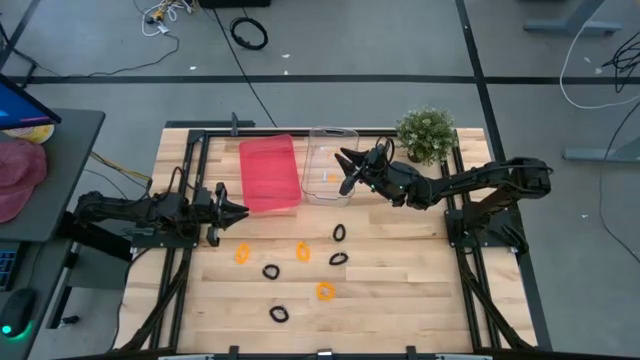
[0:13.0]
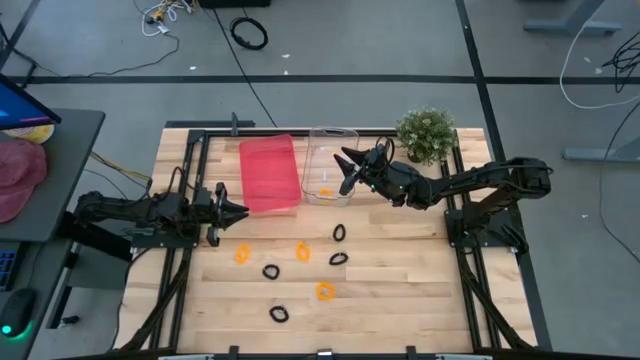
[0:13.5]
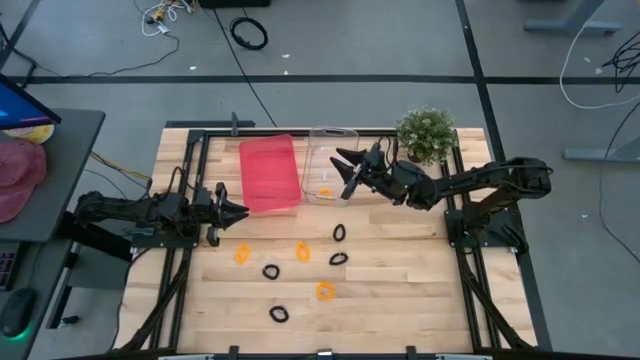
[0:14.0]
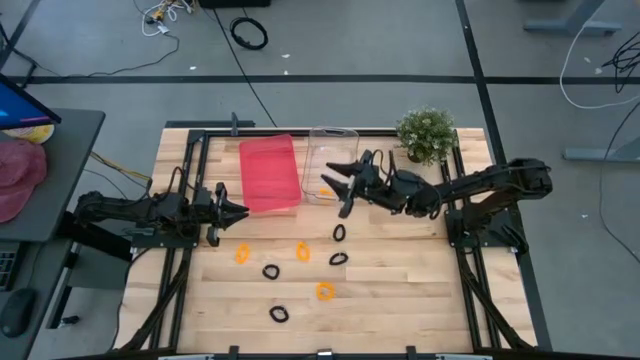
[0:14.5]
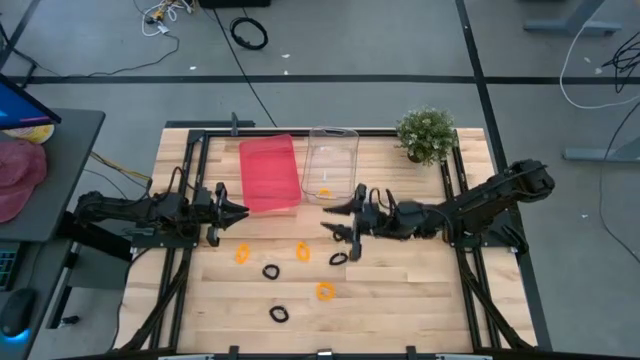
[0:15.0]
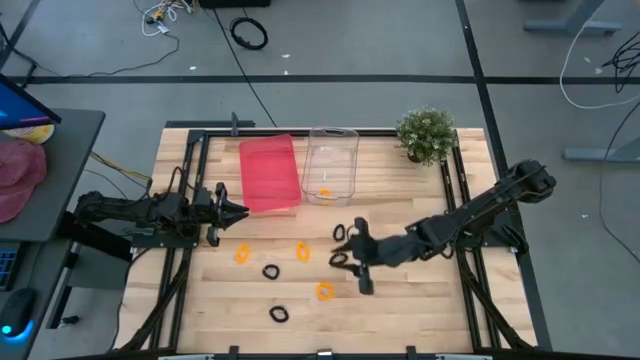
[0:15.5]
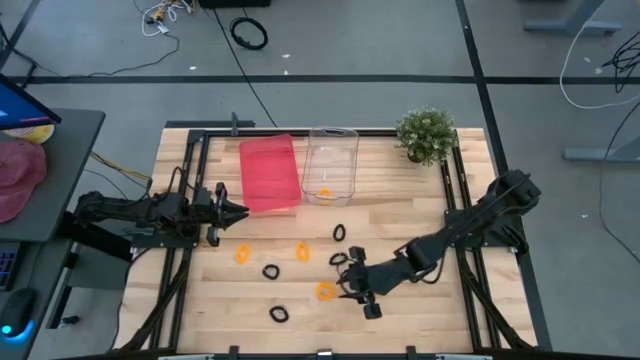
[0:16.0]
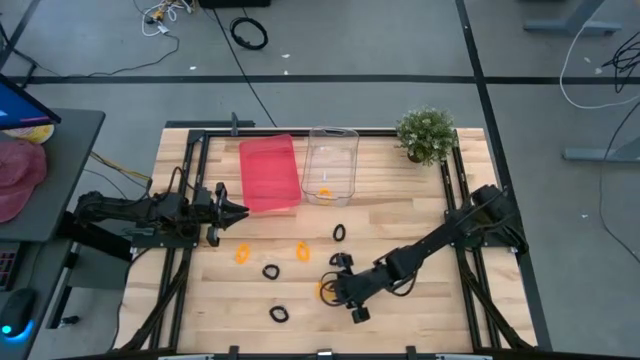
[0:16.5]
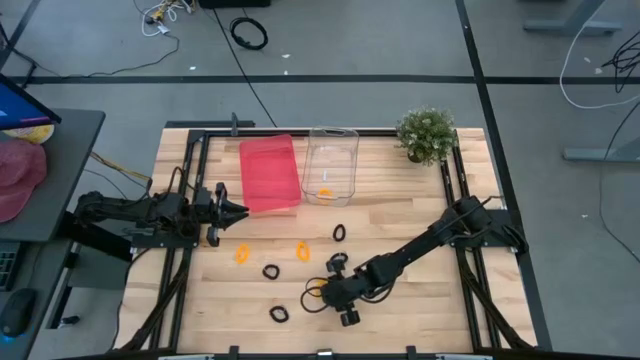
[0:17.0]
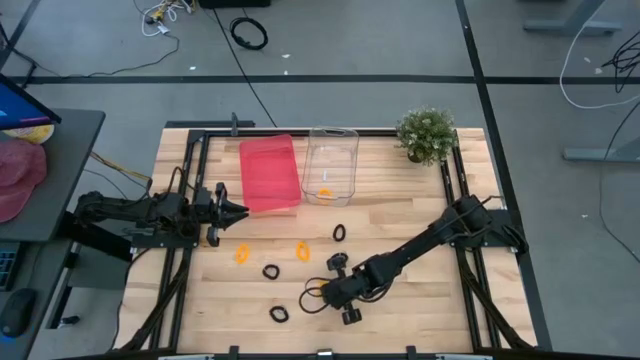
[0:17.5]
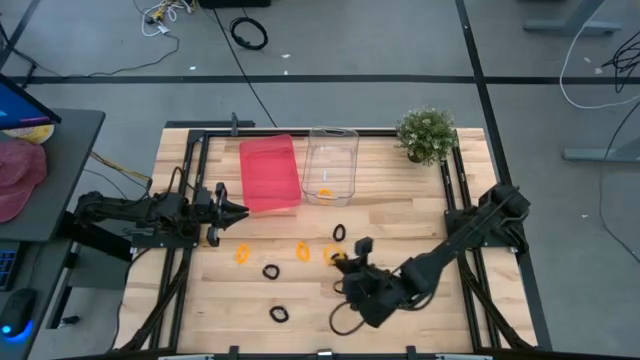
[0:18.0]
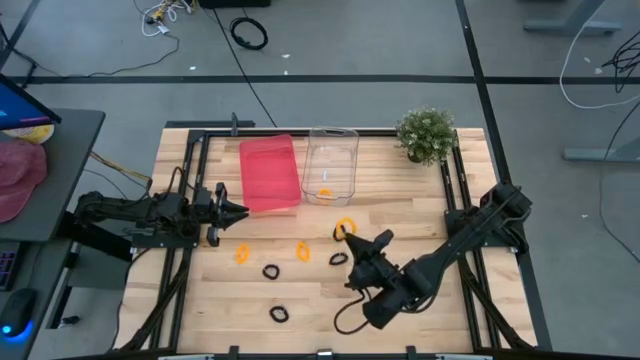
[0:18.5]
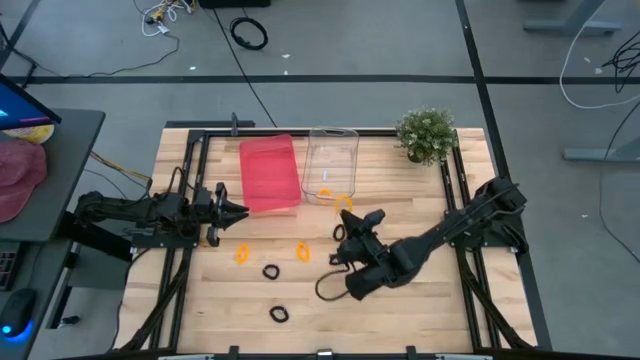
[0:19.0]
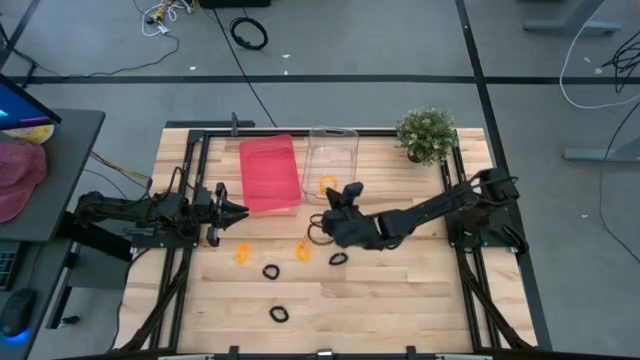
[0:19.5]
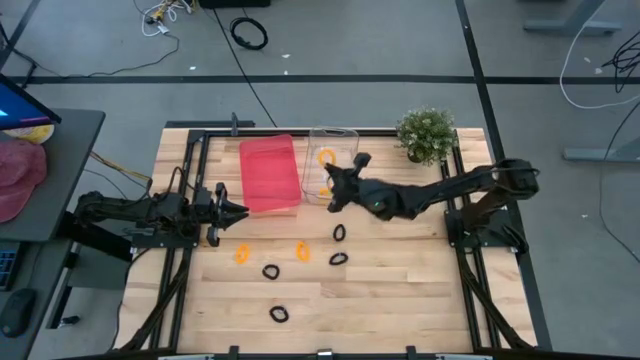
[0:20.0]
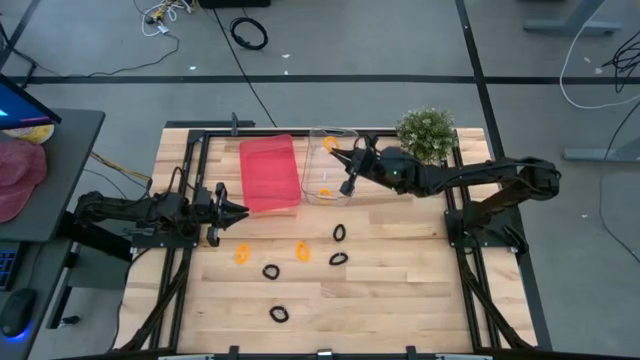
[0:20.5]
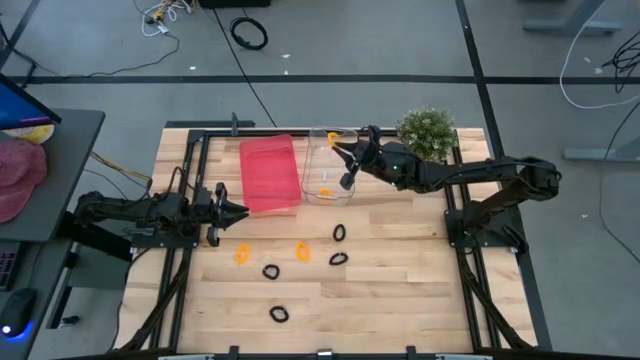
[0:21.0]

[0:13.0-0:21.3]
Task: Sort spring keychains
Put the yellow spring keychain into the transparent bin

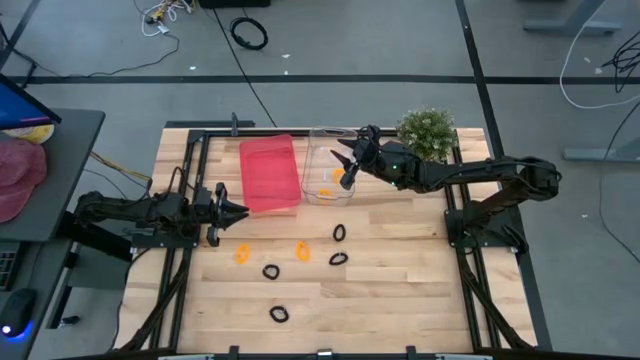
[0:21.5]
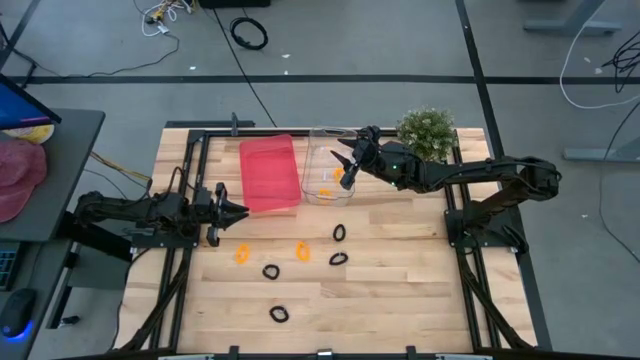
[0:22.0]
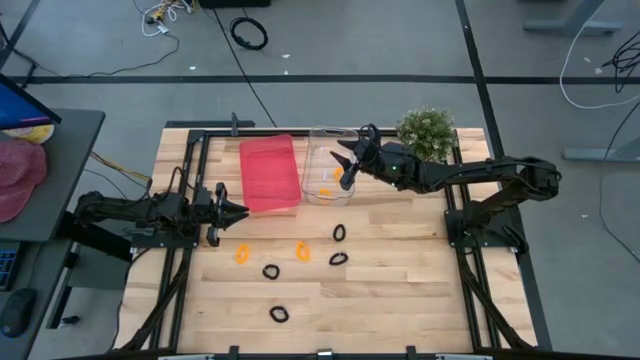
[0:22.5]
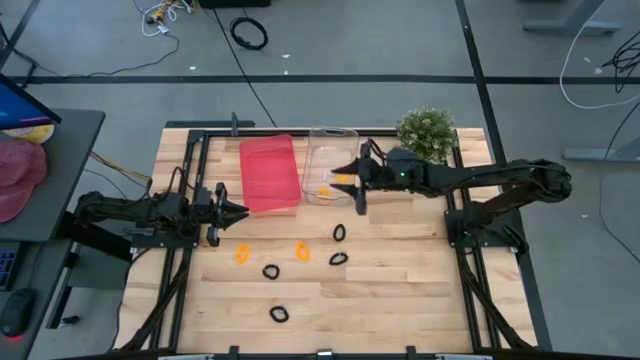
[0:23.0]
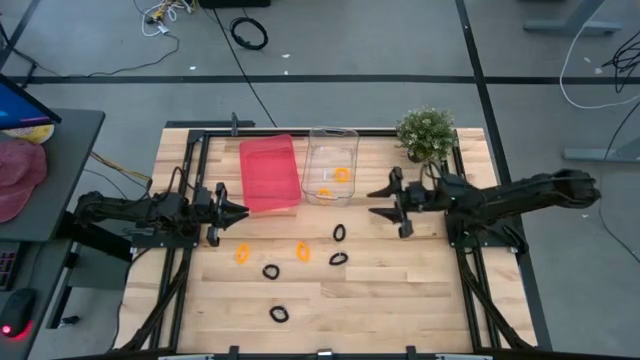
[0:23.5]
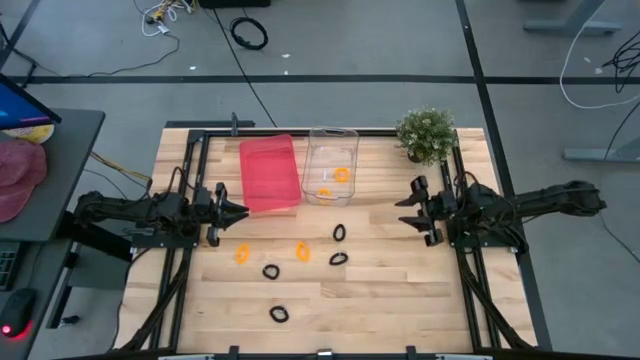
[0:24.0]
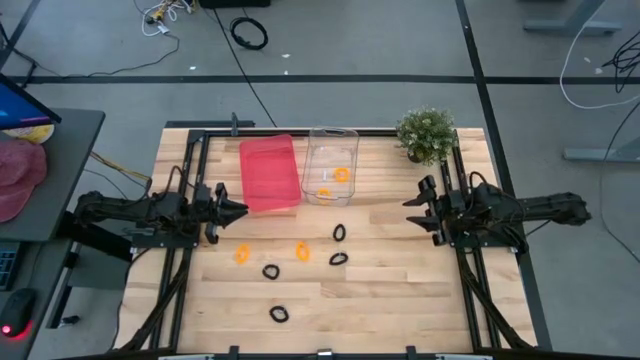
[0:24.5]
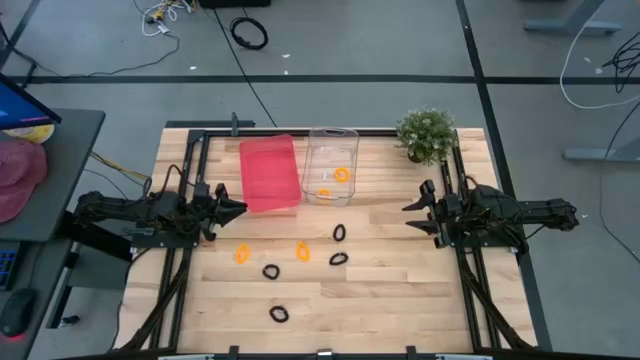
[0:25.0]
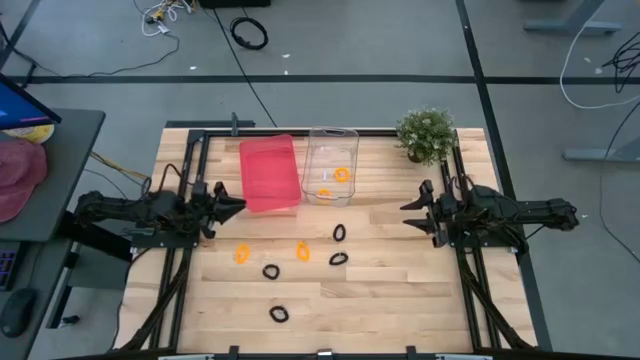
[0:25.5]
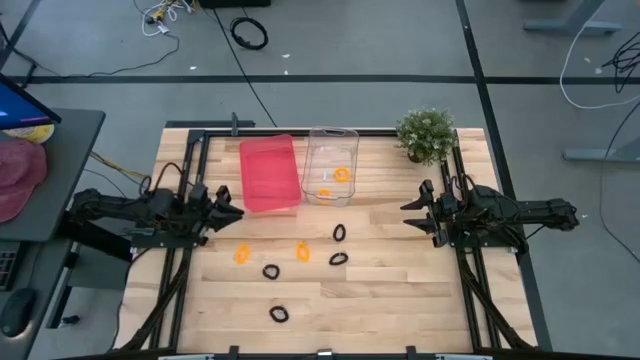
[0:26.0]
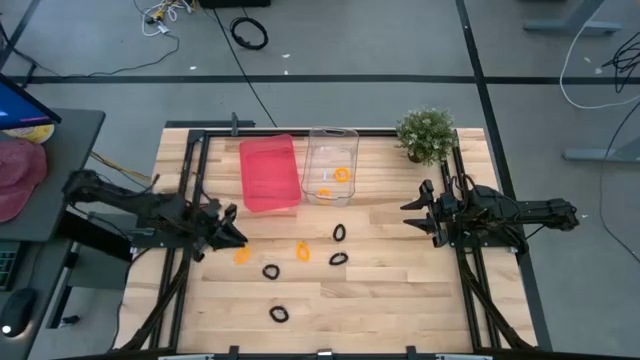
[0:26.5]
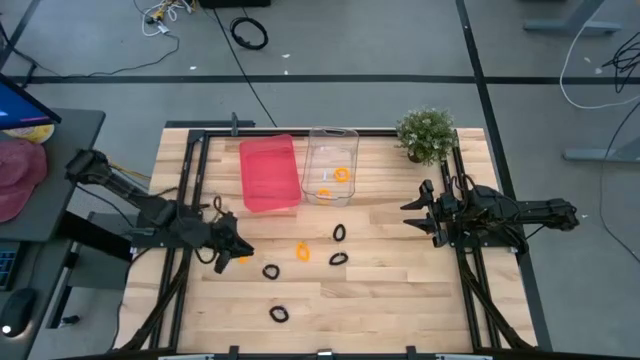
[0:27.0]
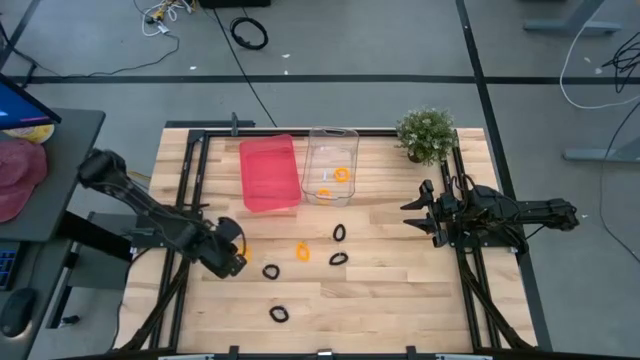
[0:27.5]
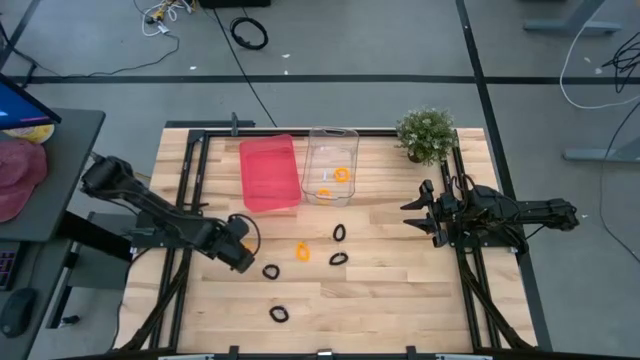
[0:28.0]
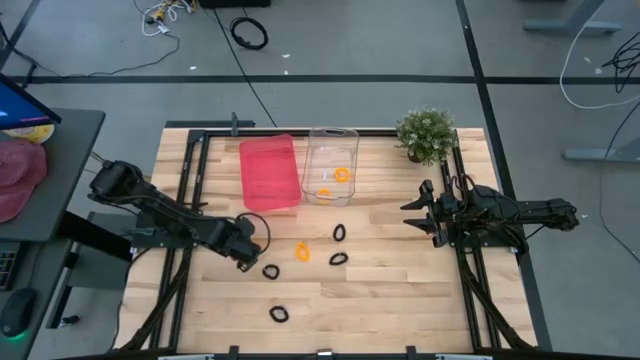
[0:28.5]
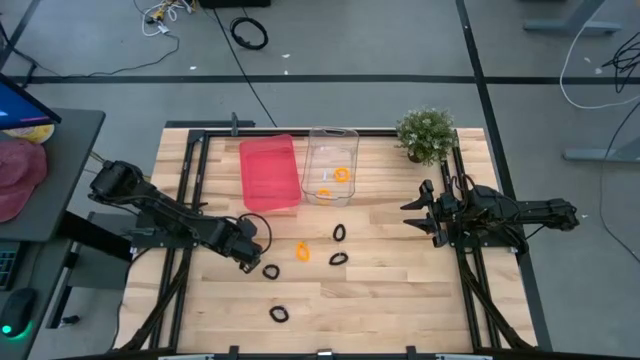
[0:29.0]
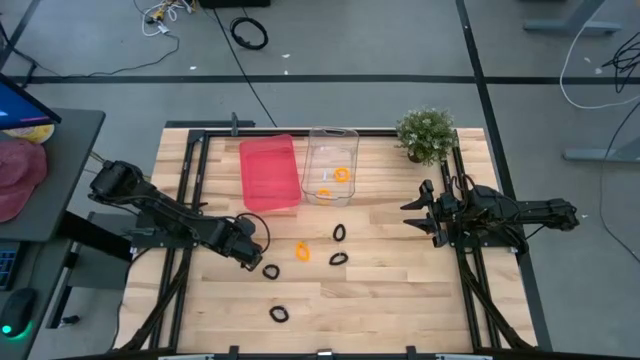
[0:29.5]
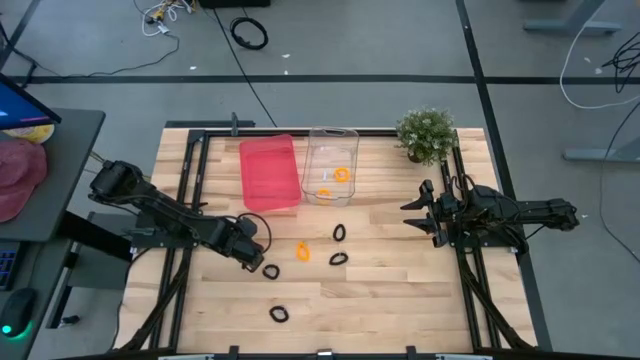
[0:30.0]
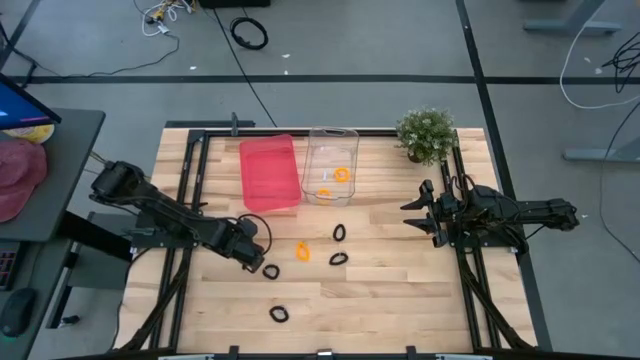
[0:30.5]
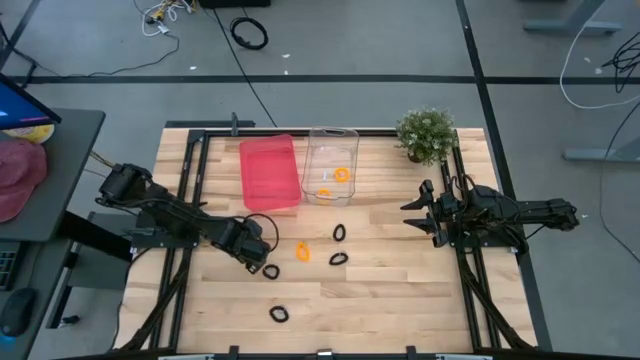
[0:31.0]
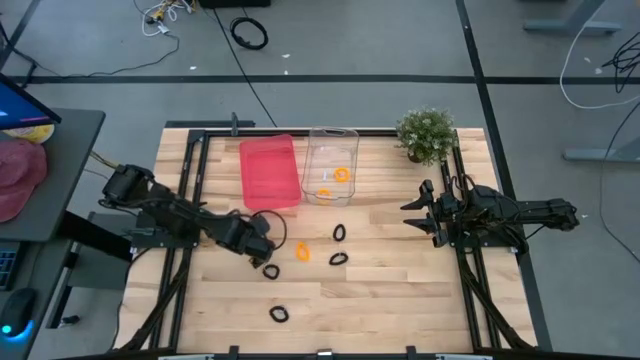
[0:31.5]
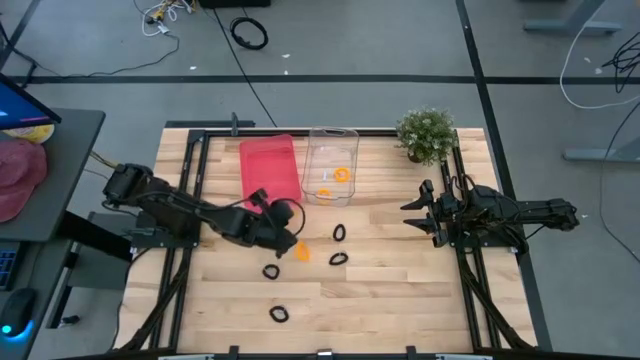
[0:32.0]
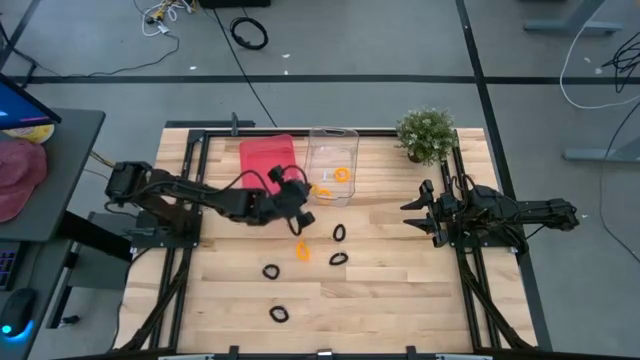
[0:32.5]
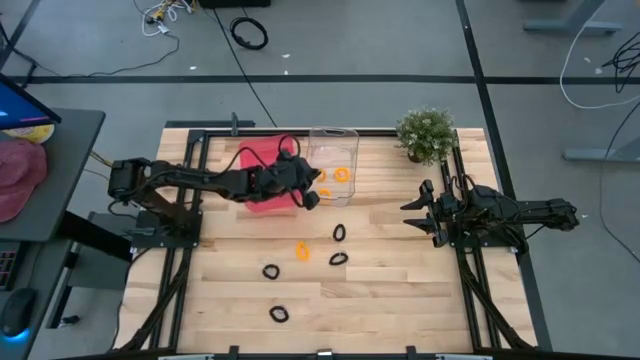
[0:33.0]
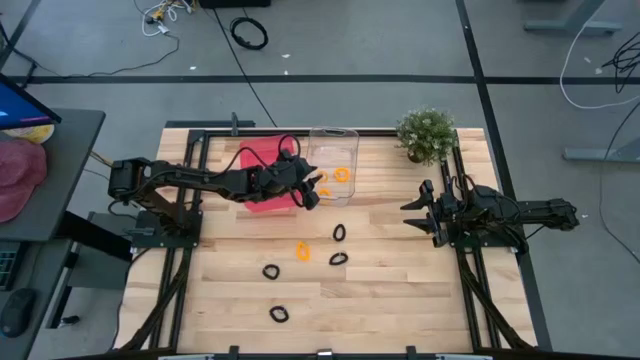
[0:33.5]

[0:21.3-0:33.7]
Put the yellow spring keychain into the transparent bin
